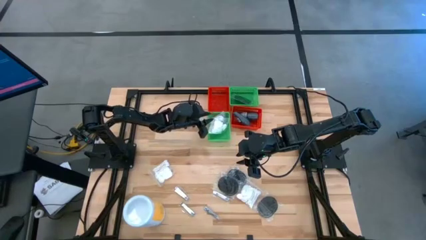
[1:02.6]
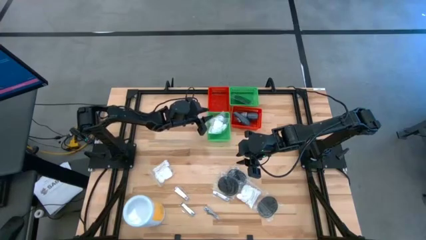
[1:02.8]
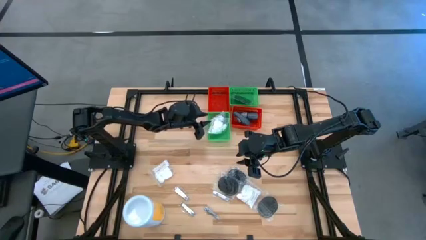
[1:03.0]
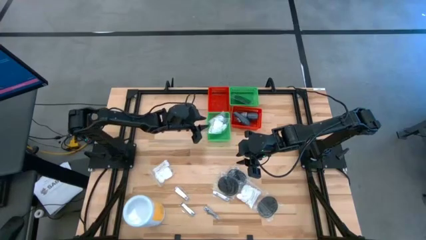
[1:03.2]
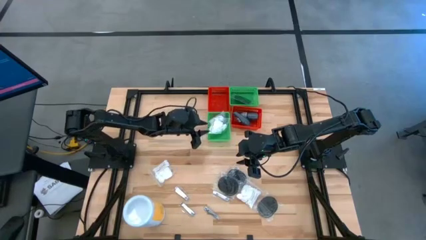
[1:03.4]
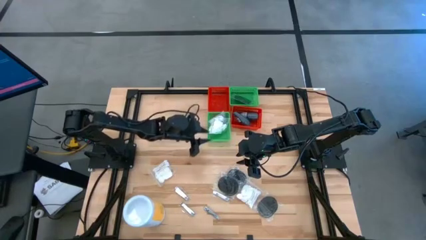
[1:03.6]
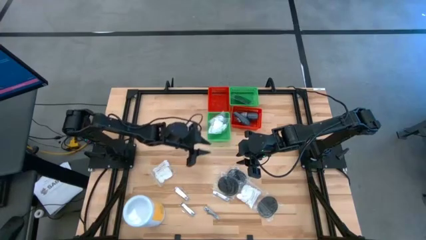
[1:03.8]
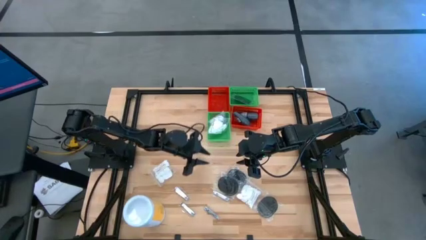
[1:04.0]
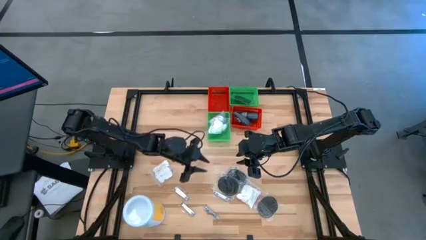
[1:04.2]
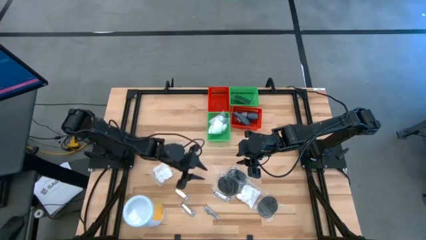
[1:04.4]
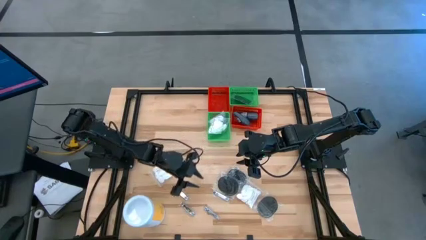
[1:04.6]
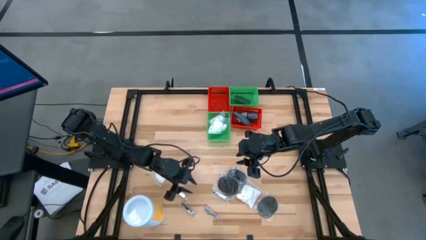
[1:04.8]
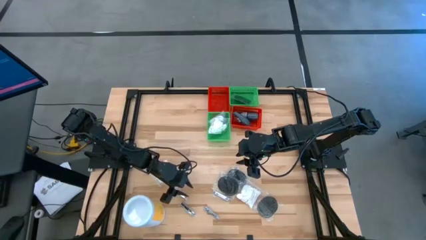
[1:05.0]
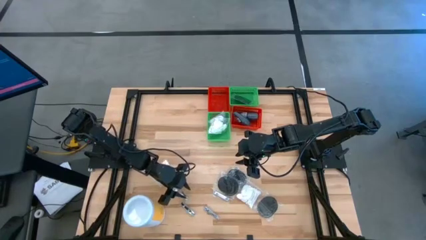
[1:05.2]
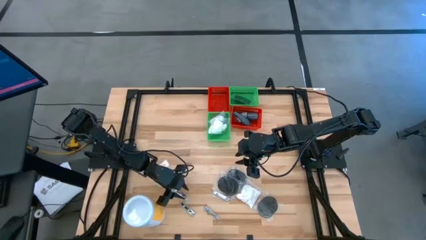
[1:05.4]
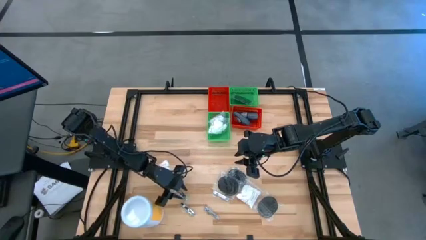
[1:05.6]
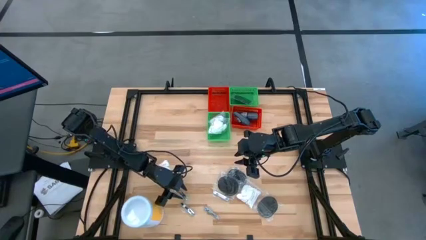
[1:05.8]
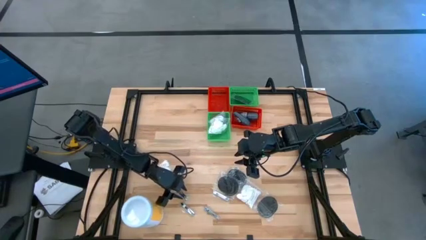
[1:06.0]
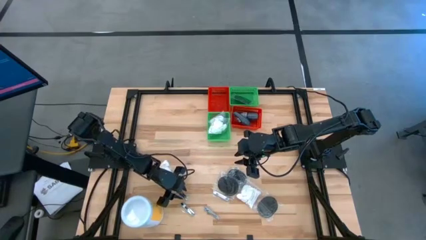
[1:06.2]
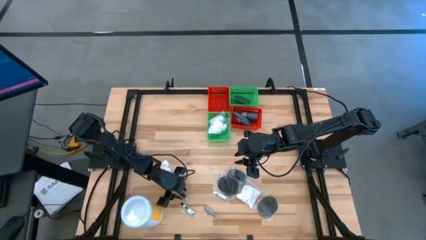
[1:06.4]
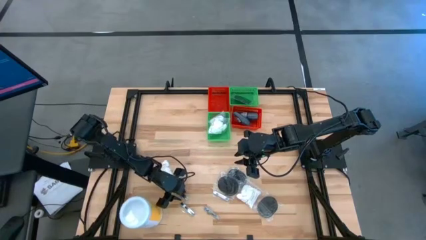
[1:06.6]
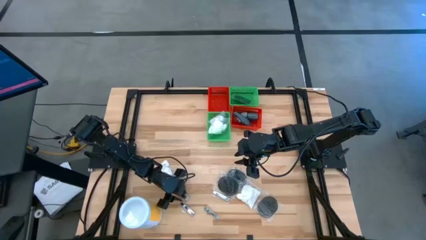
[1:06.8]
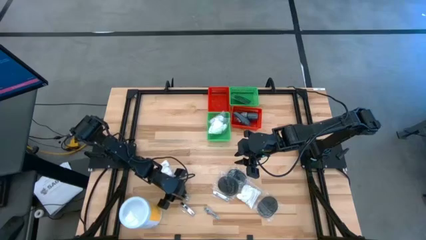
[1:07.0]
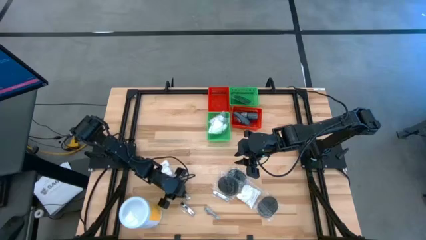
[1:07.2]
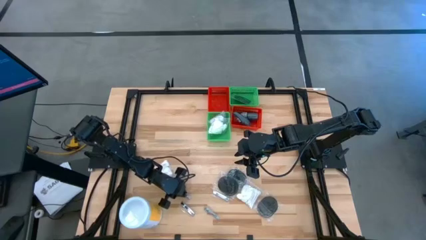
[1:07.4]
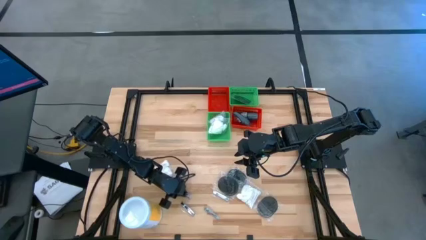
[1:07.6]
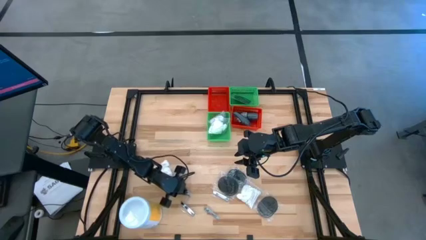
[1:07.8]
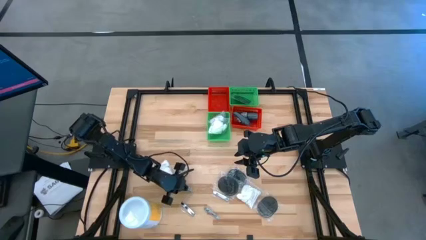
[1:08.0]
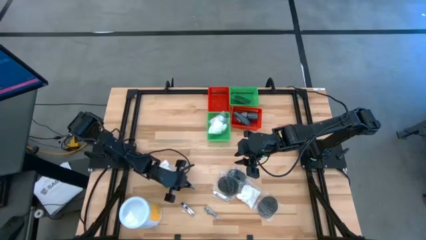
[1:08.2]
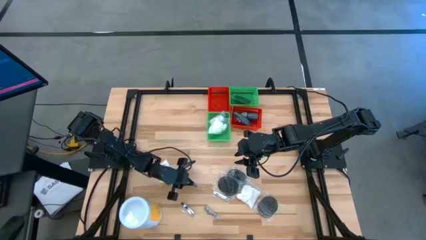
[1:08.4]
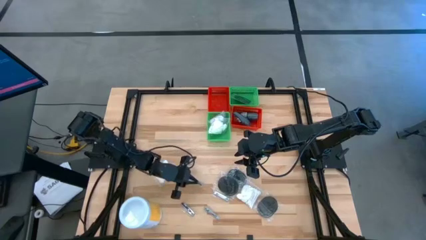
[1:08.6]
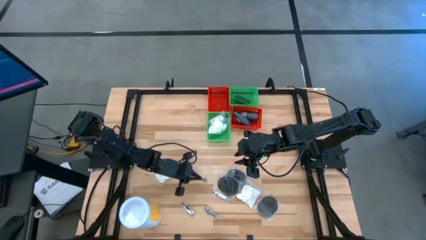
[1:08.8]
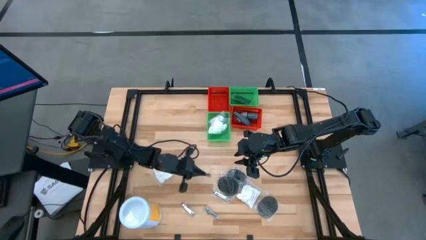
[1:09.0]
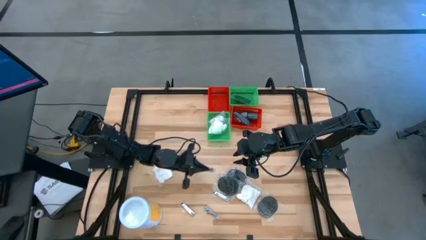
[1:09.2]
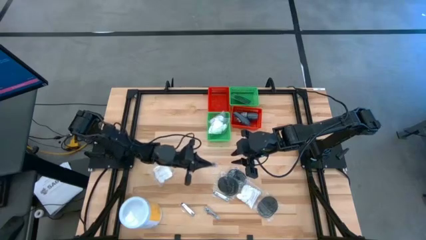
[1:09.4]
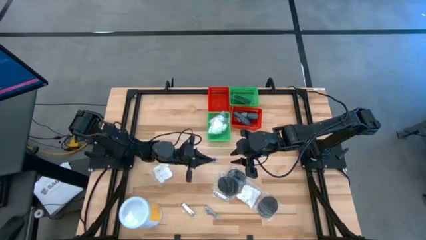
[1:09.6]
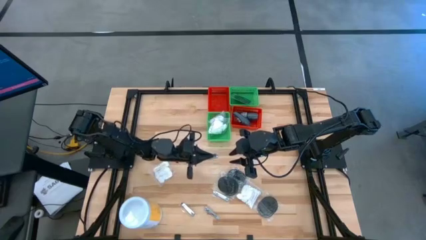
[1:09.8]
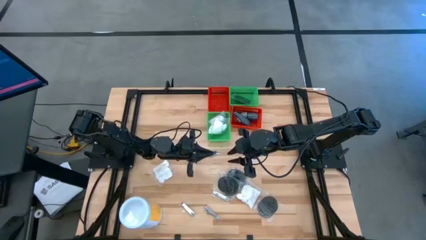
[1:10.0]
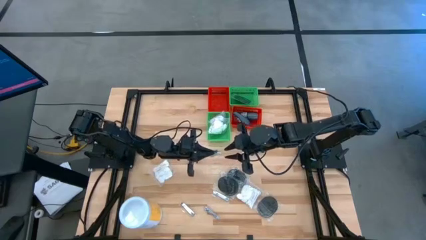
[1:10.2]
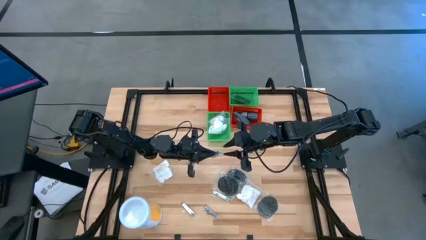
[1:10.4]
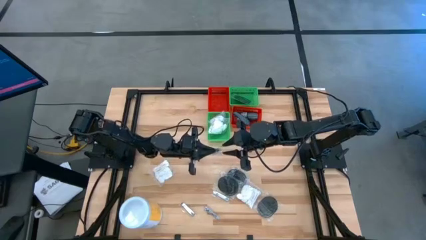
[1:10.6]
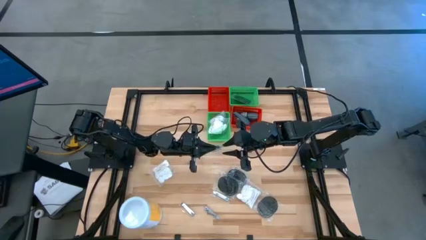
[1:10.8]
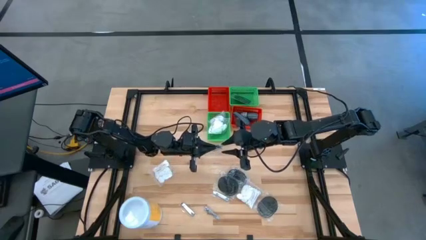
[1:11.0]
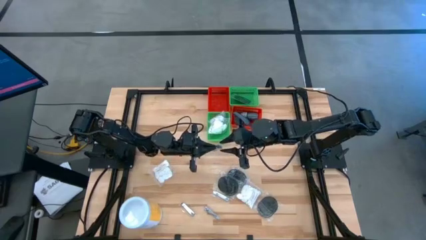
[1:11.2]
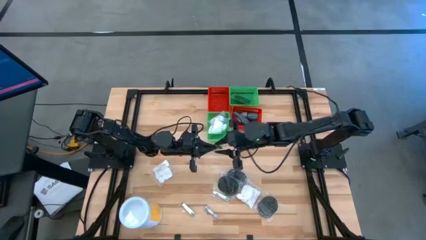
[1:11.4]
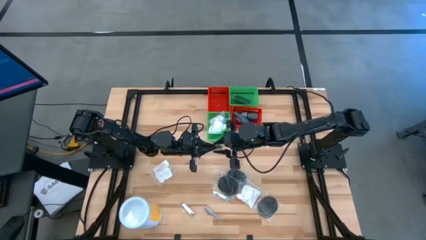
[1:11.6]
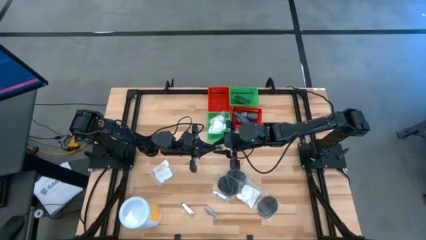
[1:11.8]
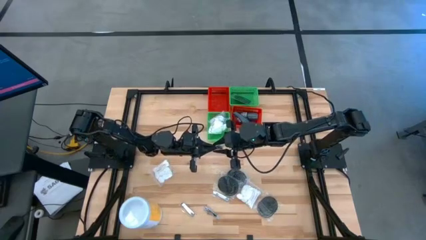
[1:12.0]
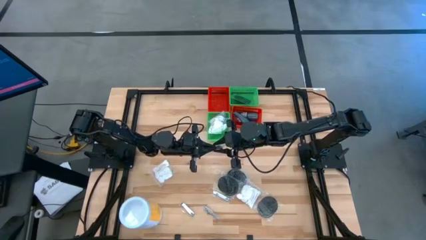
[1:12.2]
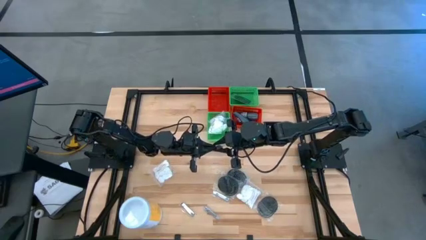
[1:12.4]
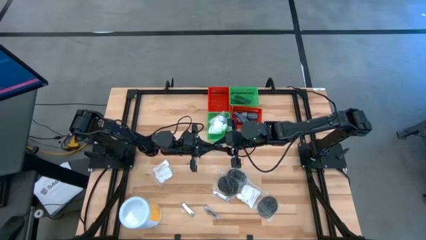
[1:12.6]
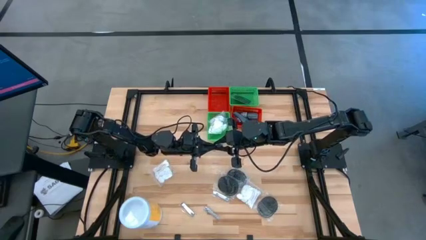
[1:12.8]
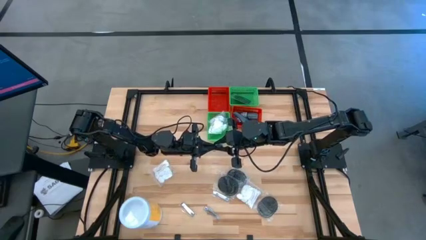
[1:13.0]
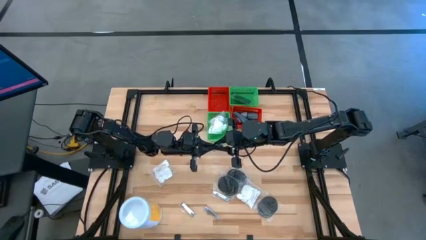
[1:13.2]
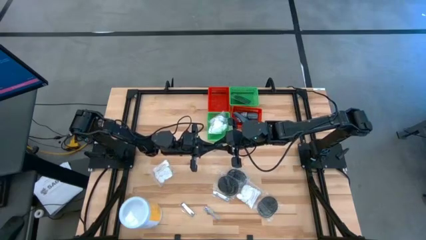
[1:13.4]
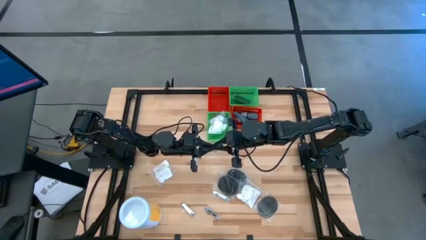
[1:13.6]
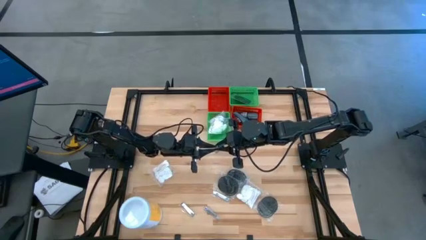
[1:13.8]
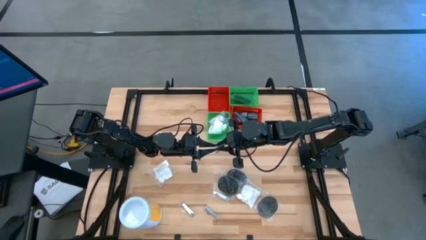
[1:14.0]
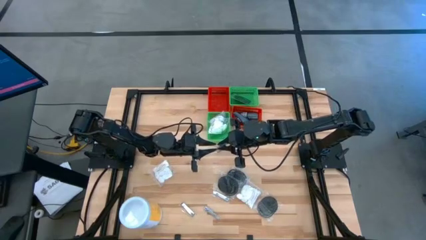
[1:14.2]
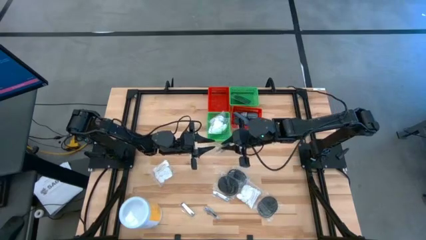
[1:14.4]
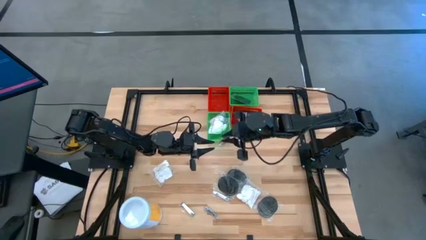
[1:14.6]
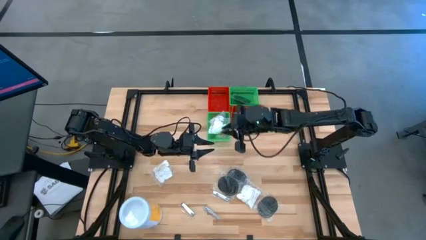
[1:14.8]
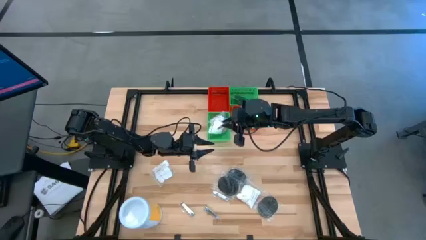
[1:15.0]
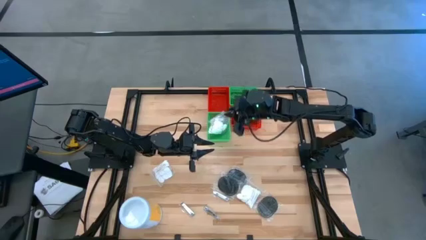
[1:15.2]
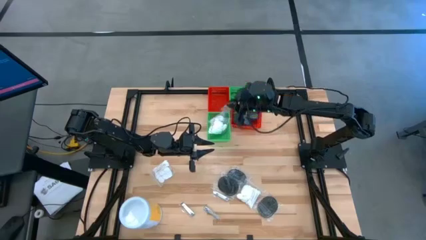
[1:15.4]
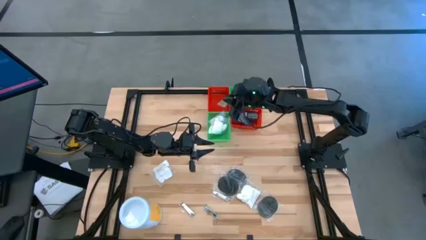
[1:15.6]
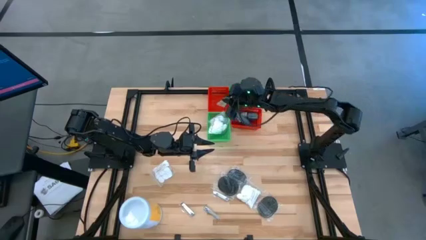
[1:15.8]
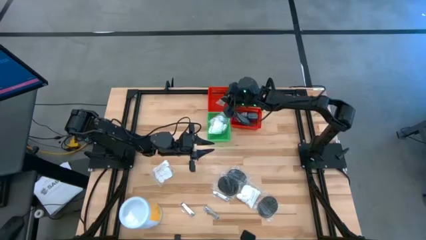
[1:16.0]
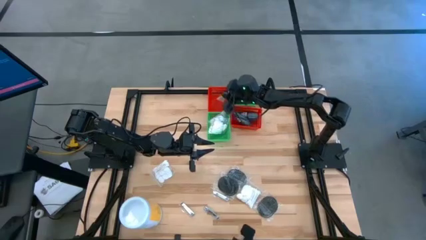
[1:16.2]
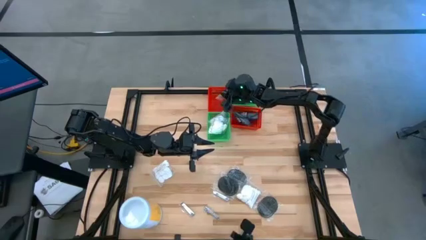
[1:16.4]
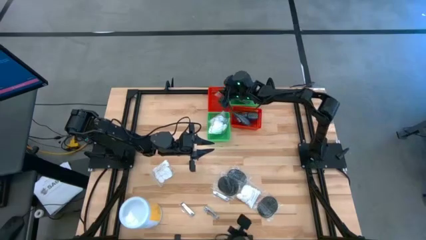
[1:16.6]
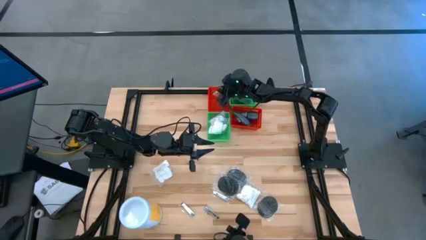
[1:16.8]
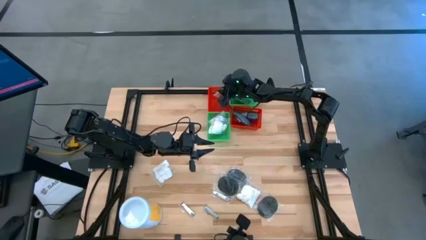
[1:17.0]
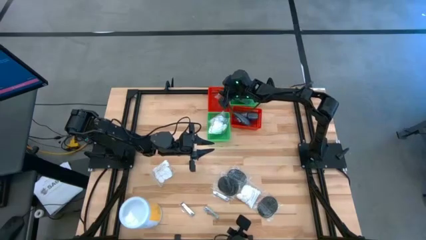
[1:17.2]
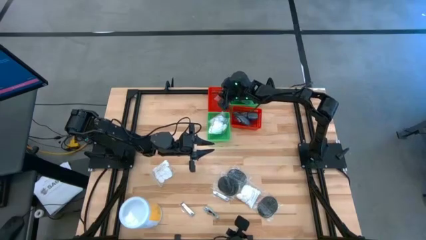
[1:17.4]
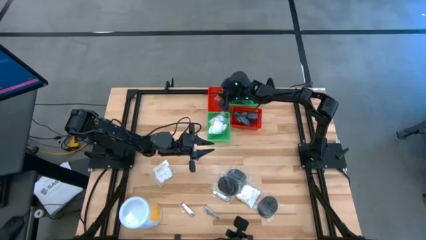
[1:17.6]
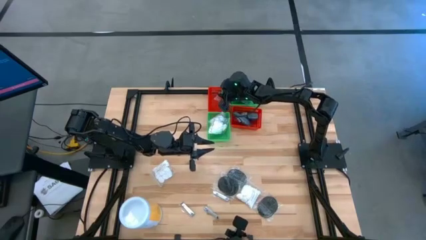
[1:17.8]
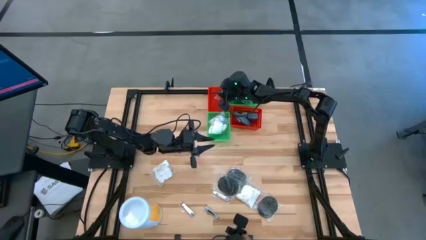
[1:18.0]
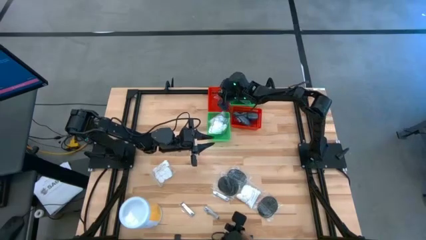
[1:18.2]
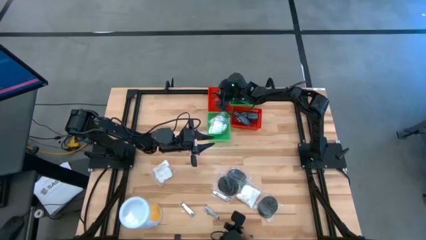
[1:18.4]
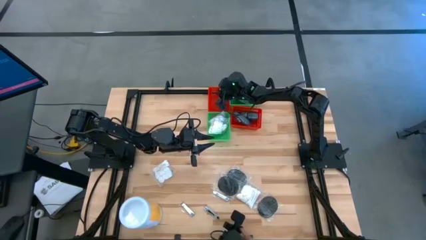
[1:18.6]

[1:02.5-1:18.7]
Task: Pick & Place Travel size toiletries
Put the nail cutter into the left red bin
